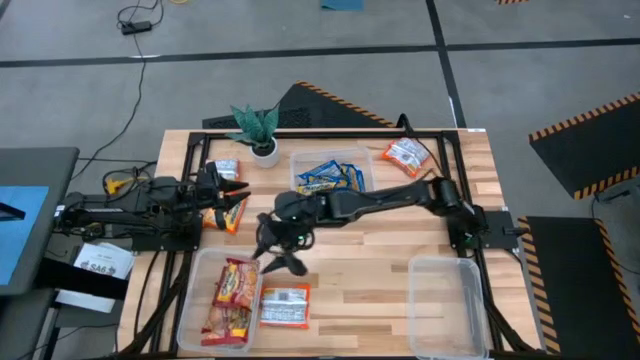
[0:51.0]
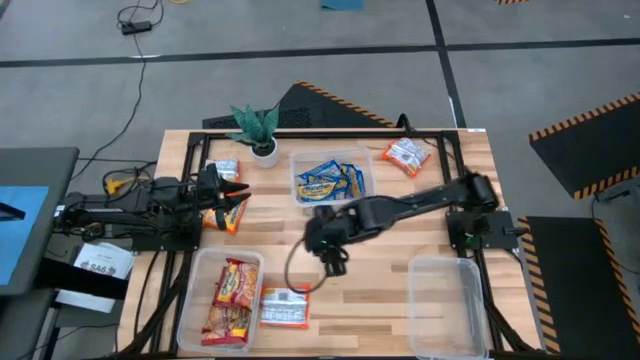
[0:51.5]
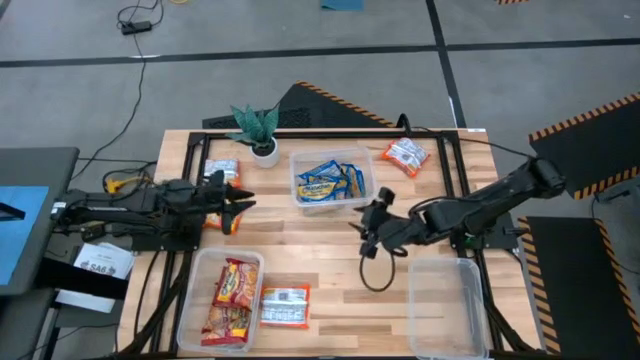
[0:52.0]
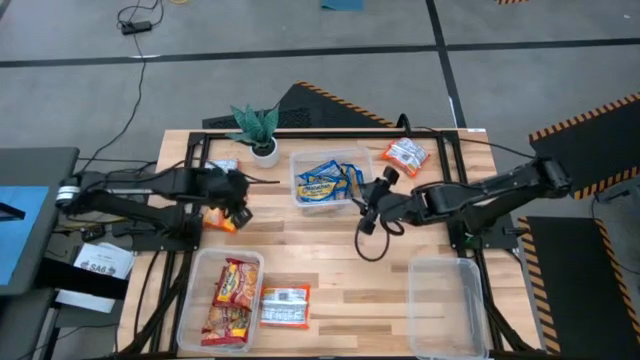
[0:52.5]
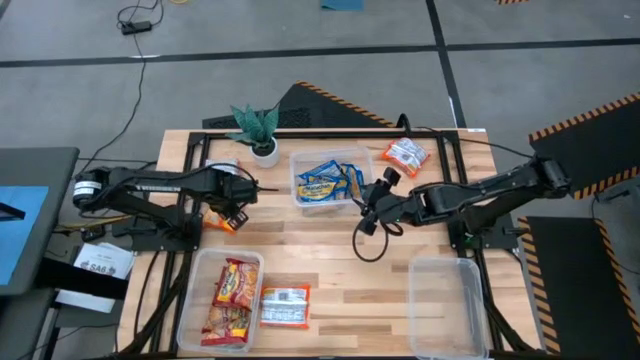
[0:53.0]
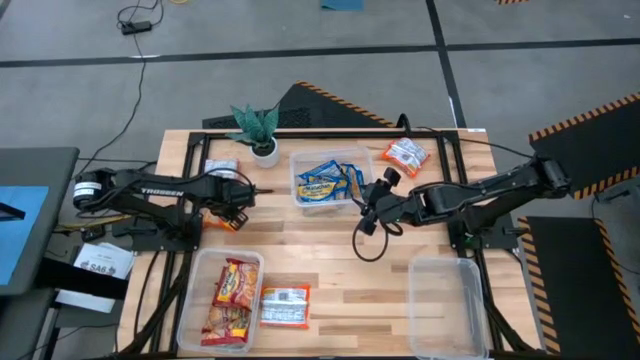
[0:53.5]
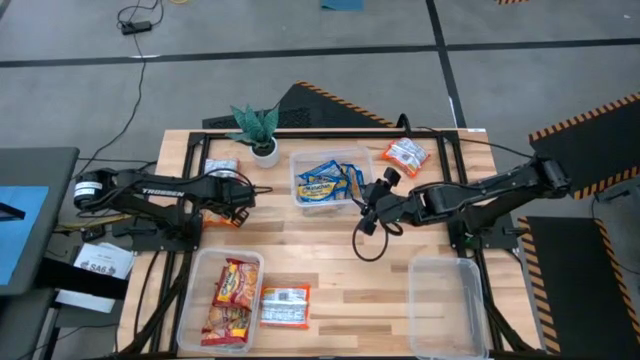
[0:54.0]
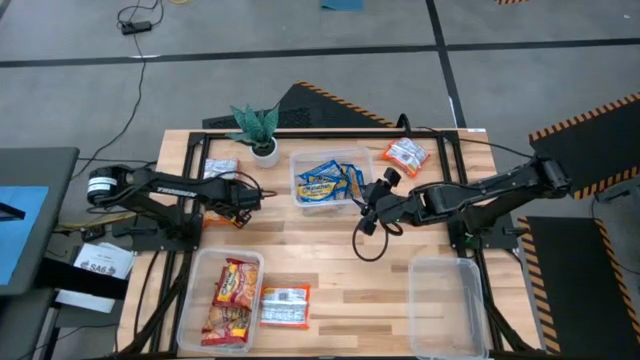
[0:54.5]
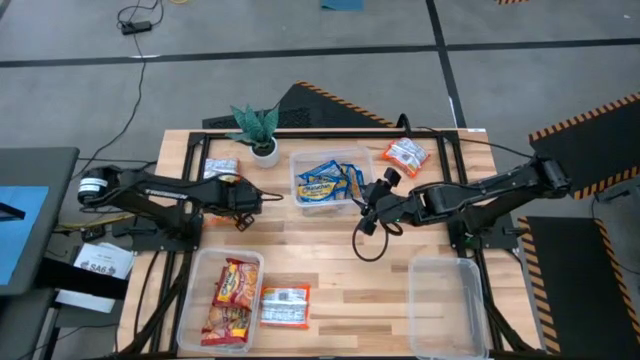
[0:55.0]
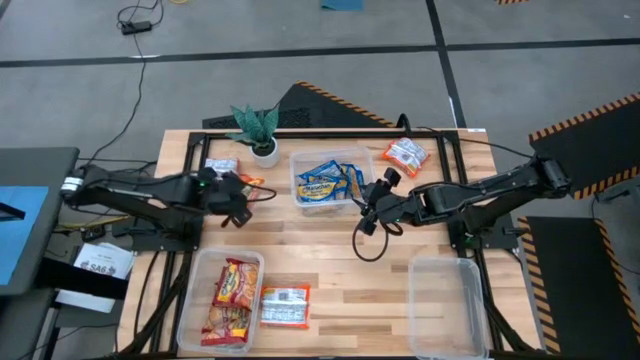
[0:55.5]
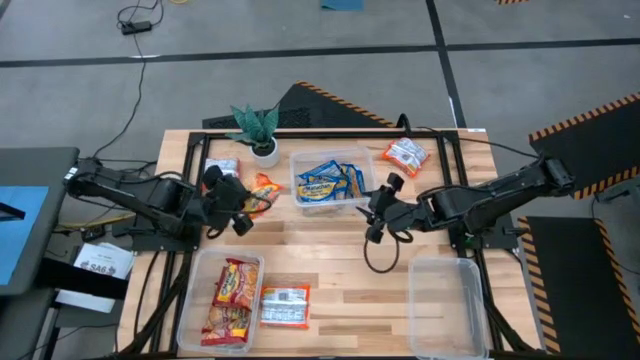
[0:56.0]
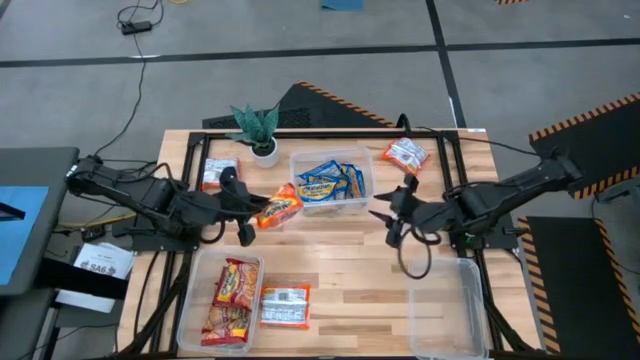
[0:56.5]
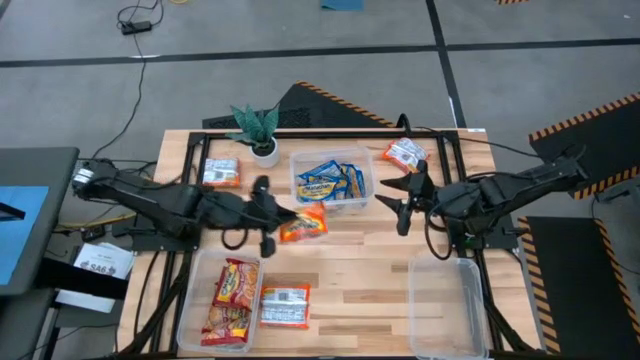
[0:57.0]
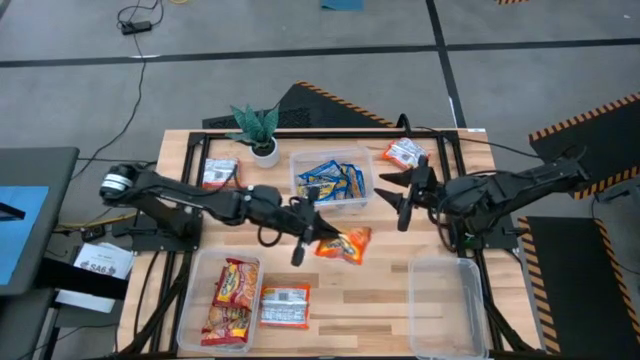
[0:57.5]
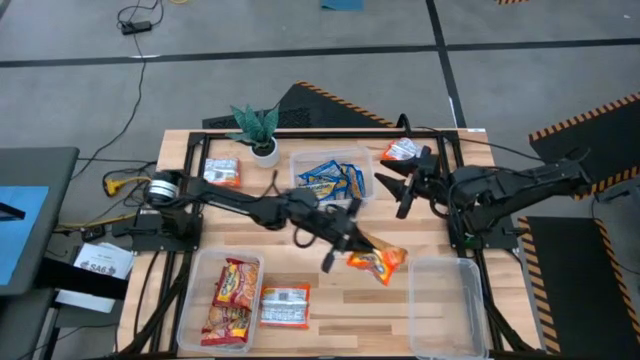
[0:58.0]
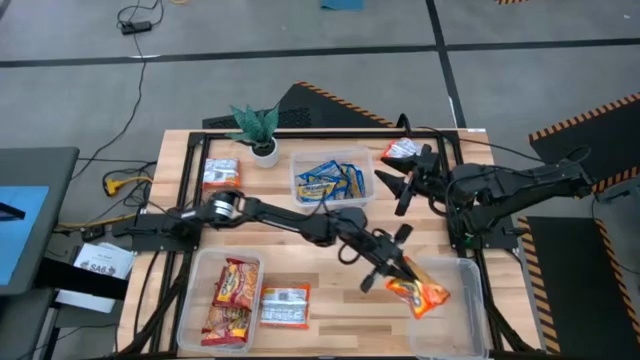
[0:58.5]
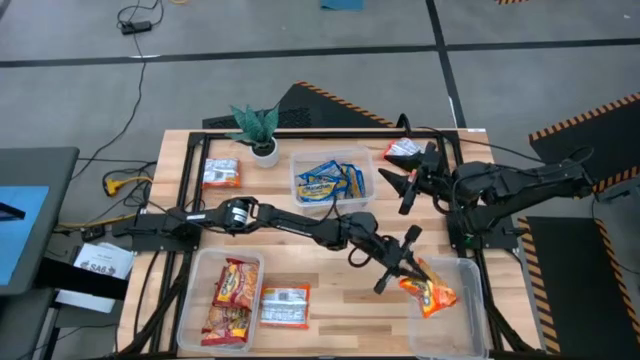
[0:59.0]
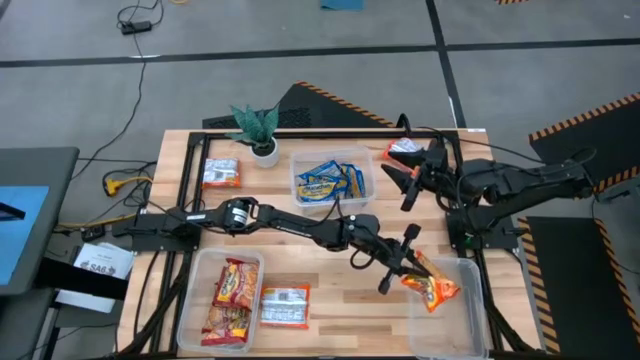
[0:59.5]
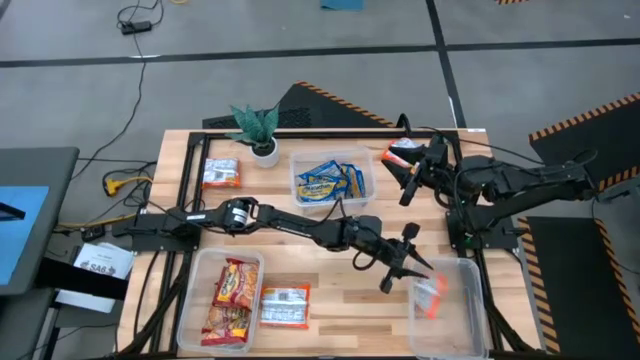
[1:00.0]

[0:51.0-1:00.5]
Task: Sort Maruchan noodles
Put the orange noodle packet into the bottom right transparent bin

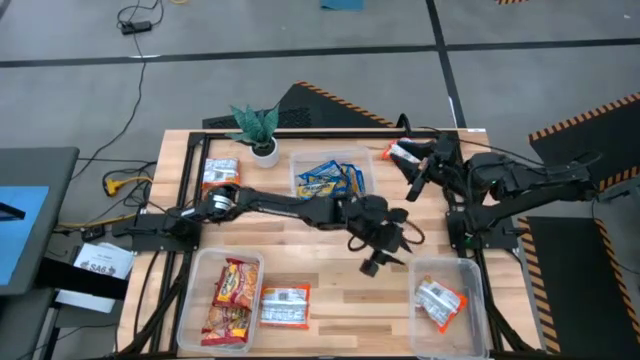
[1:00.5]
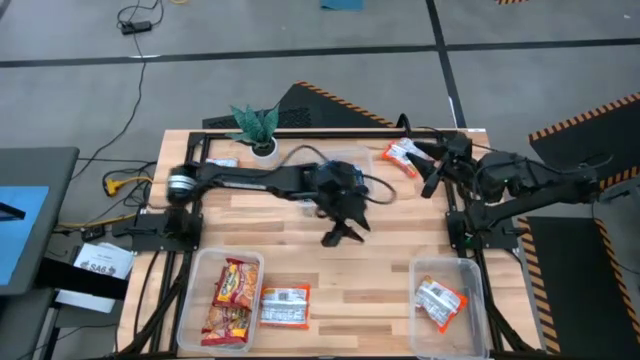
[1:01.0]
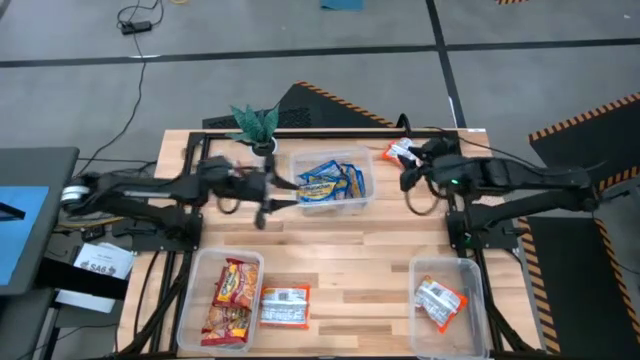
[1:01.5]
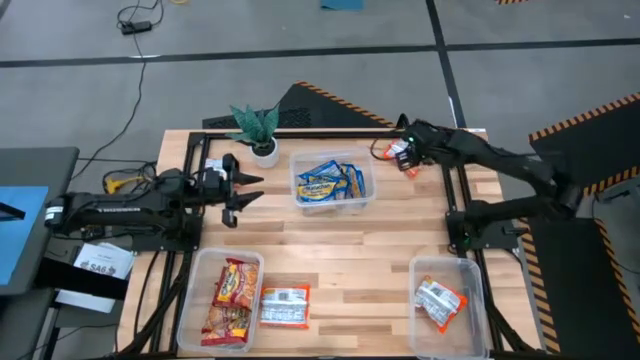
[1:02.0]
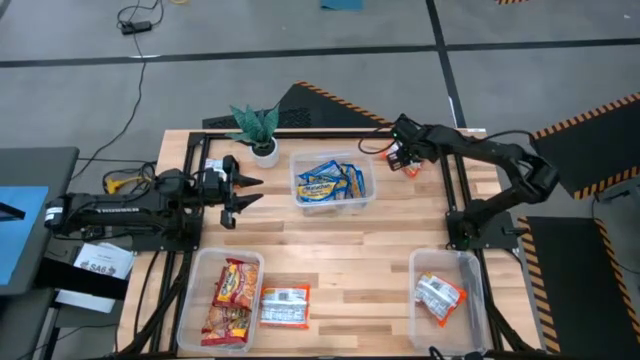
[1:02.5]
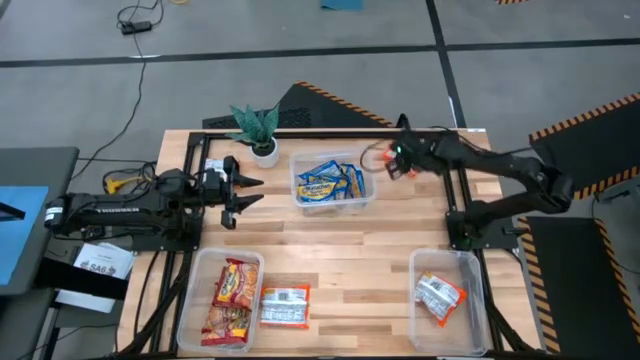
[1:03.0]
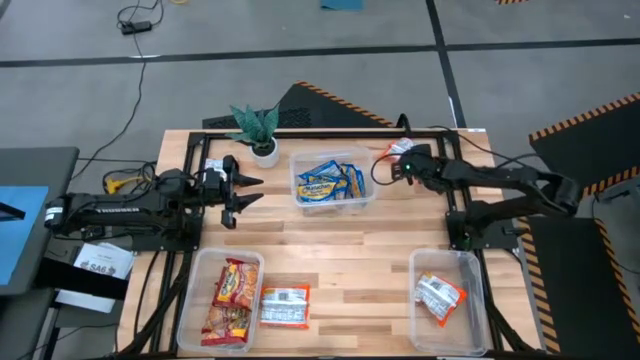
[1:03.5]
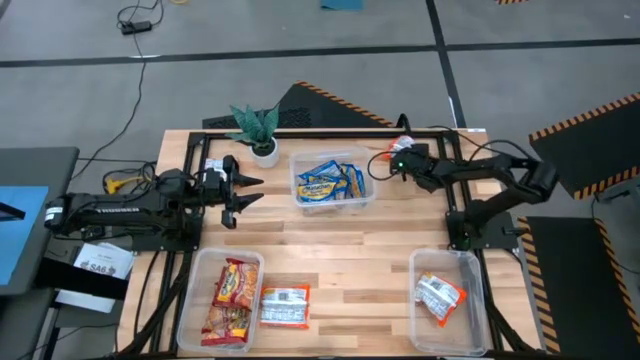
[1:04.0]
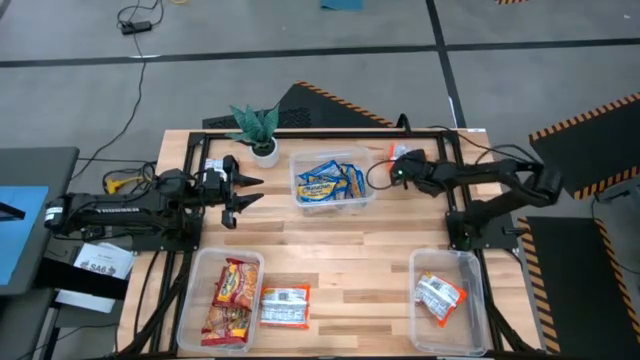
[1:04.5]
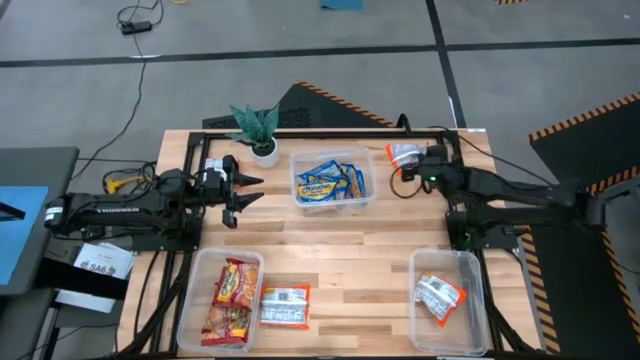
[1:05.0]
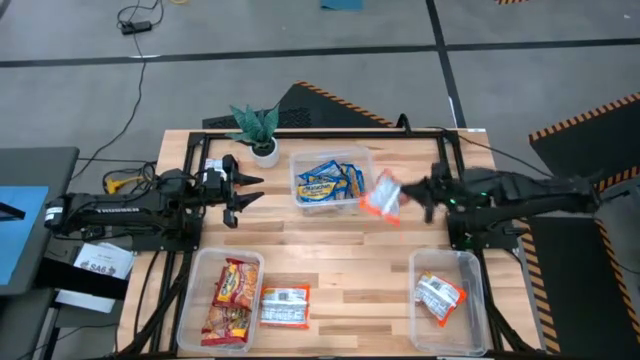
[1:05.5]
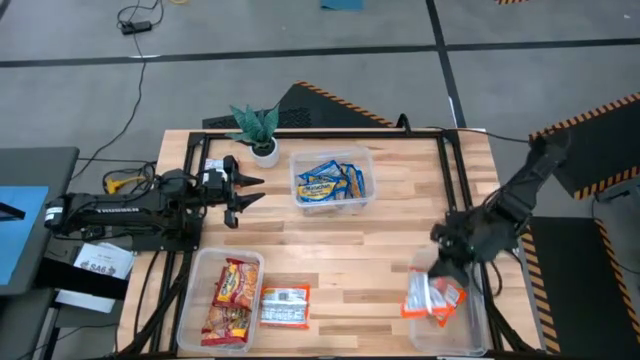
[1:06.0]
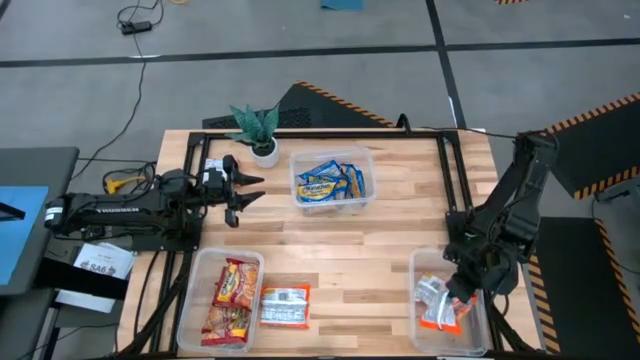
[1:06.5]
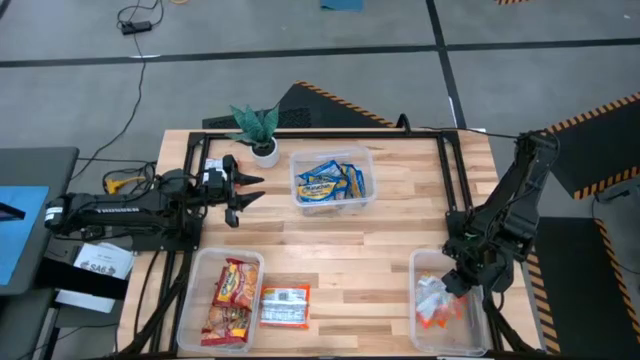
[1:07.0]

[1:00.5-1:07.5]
Put the top right orange noodle packet into the bottom right transparent bin

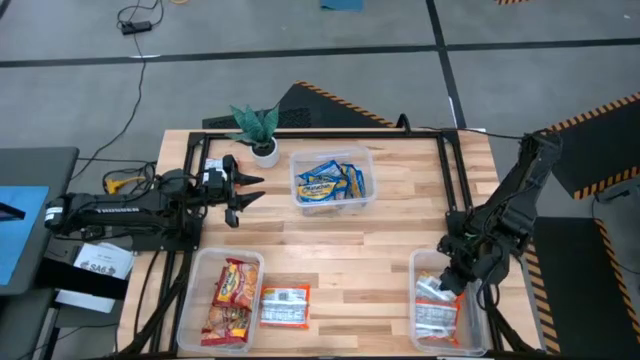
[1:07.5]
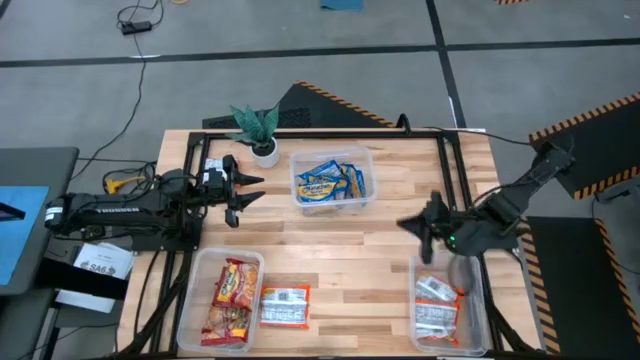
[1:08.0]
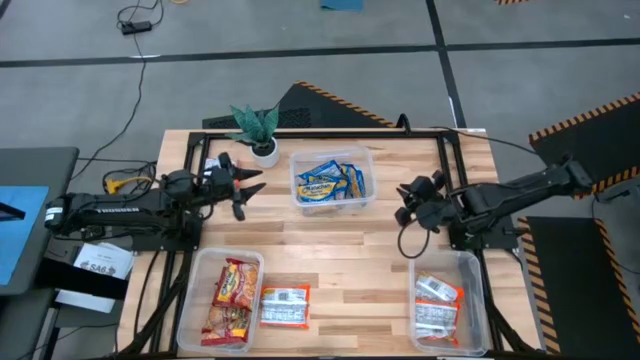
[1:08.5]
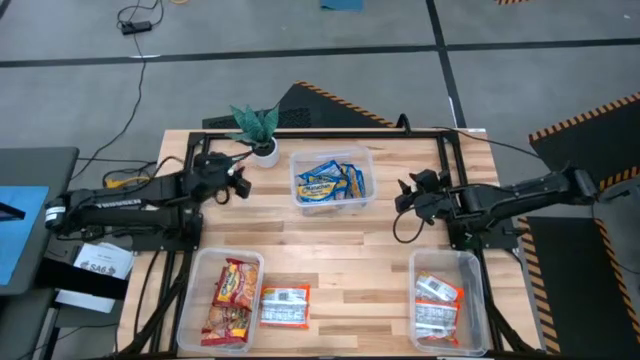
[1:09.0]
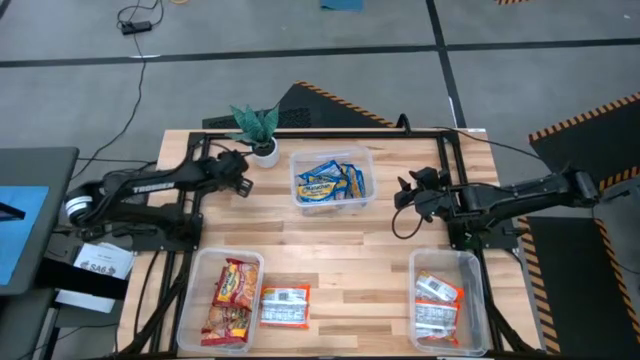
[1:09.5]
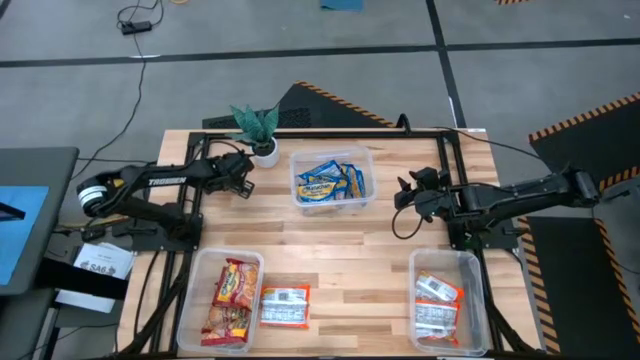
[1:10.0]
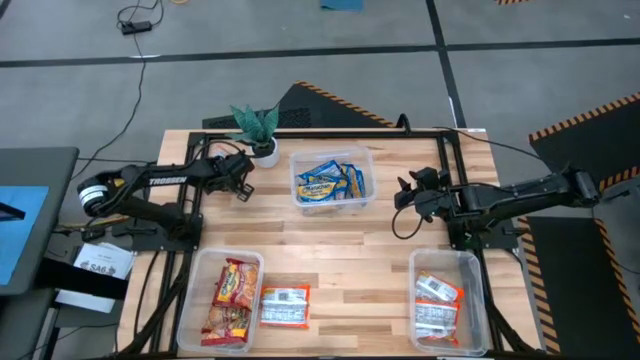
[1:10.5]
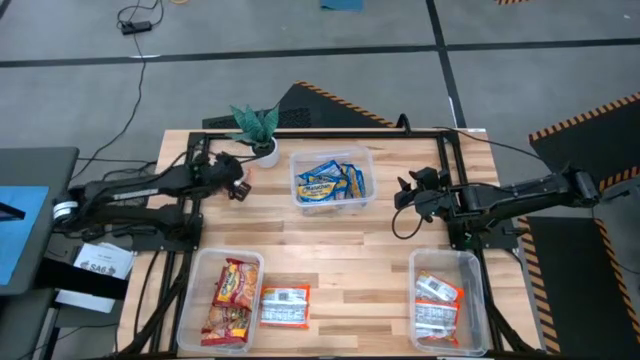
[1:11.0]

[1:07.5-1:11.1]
Put the top orange noodle packet into the bottom right transparent bin

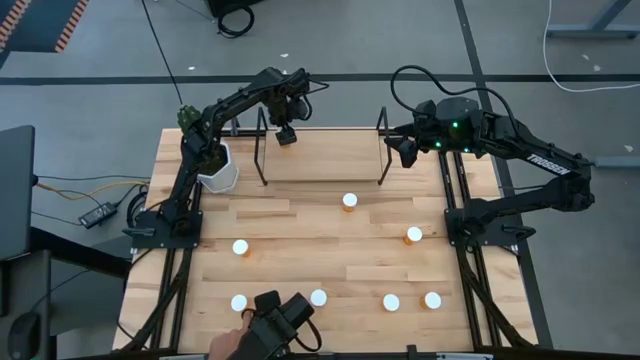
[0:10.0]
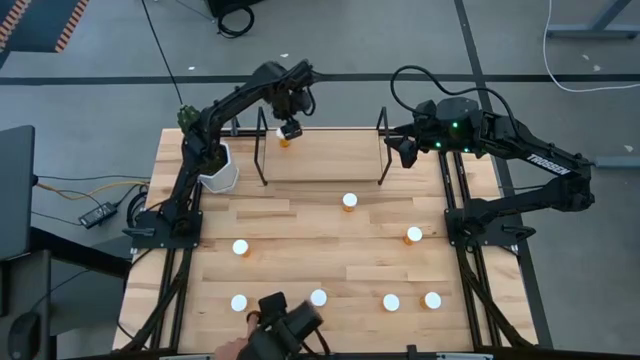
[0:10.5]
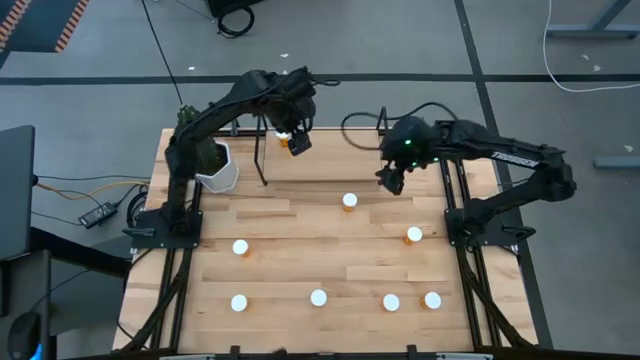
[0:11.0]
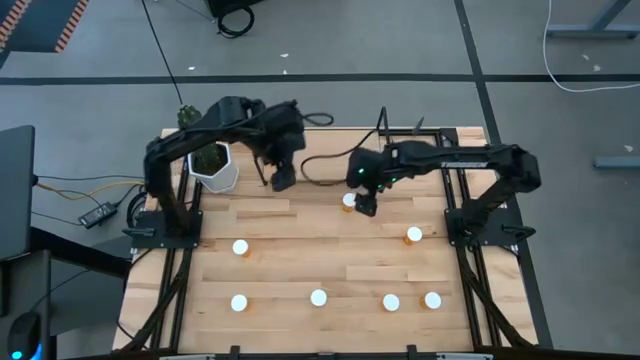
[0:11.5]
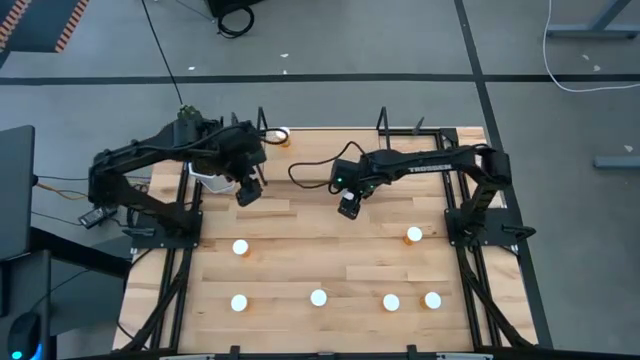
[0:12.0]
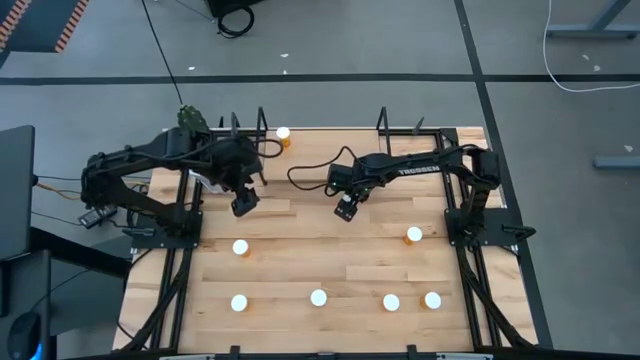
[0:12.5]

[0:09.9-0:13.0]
Task: Pick and place medicine bottles onto shelf by color
Put the orange pill bottle on the shelf
